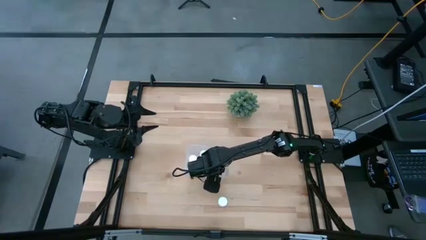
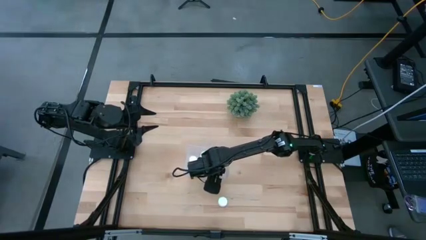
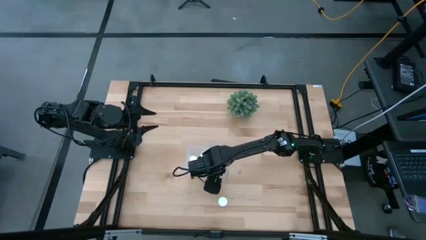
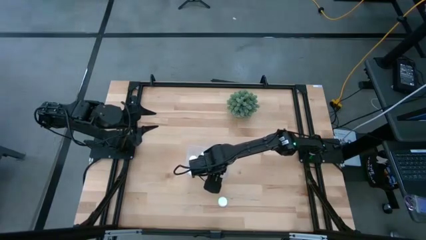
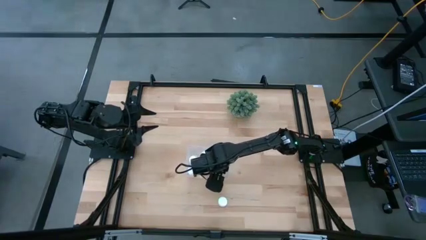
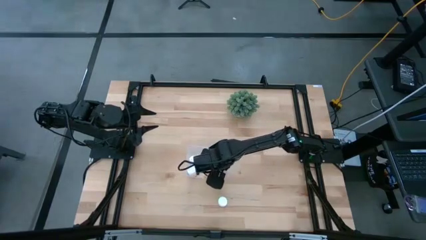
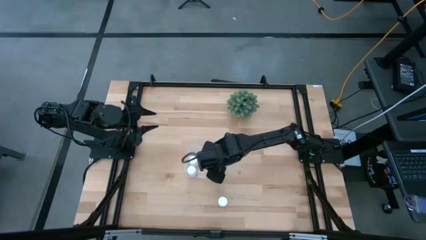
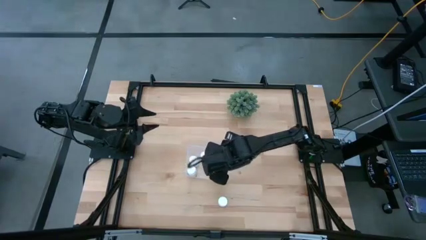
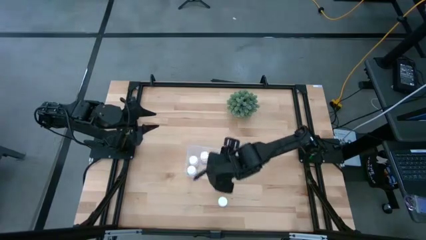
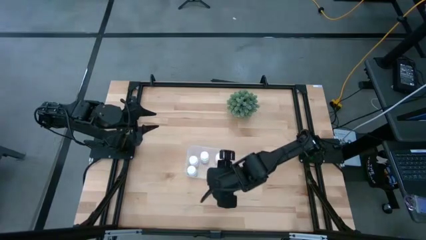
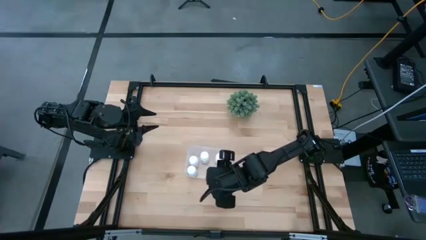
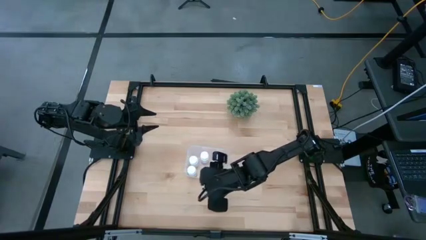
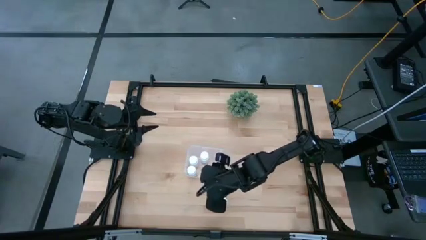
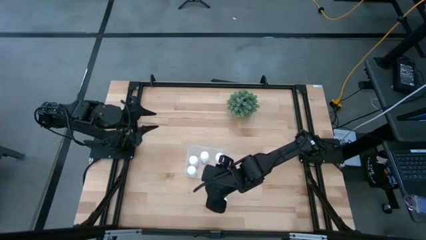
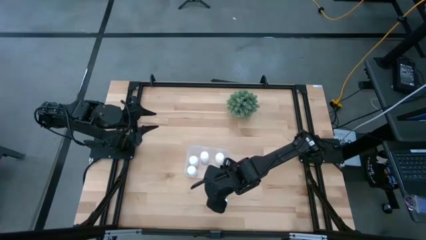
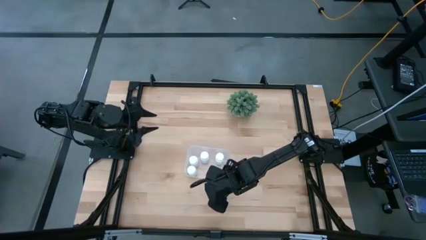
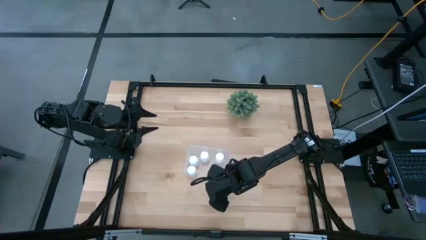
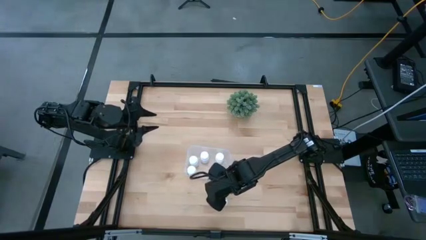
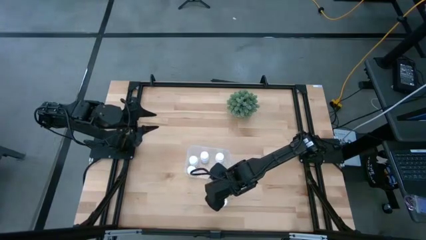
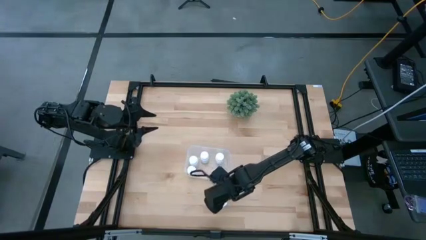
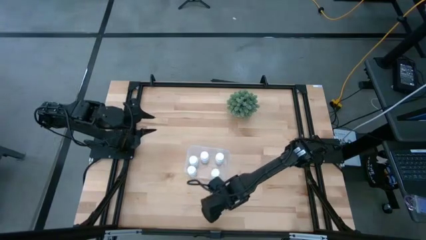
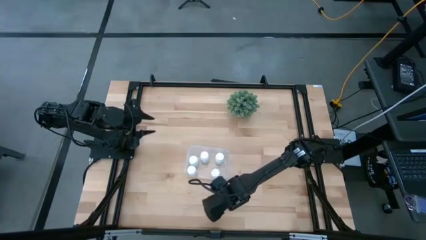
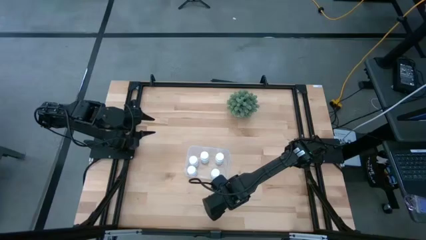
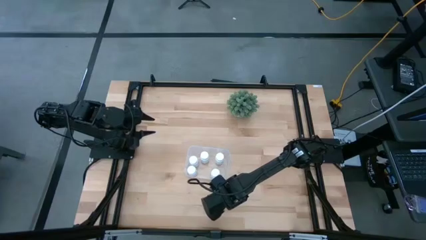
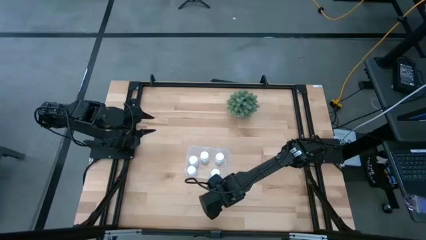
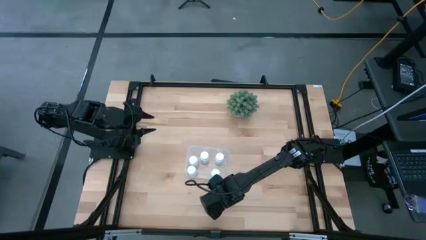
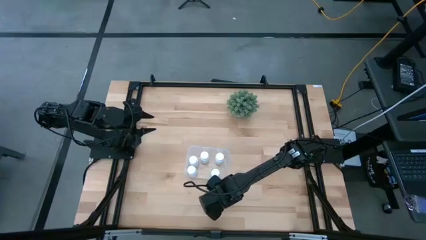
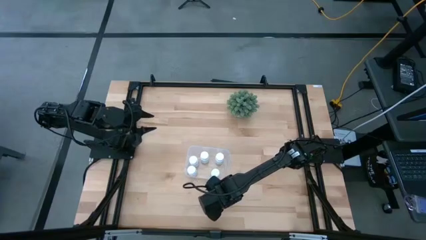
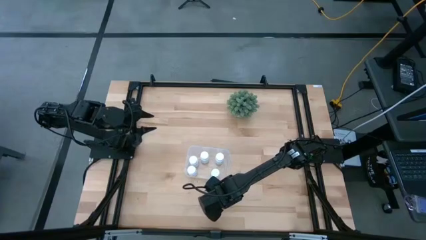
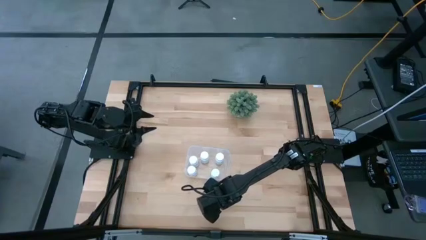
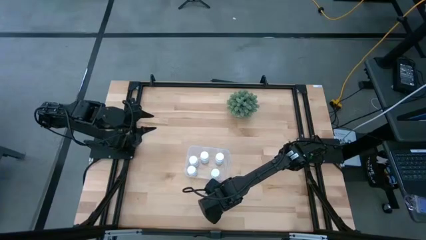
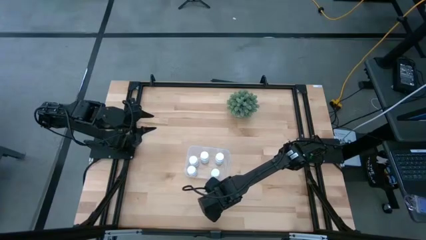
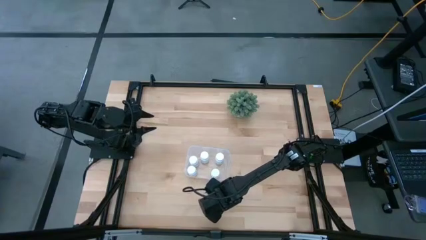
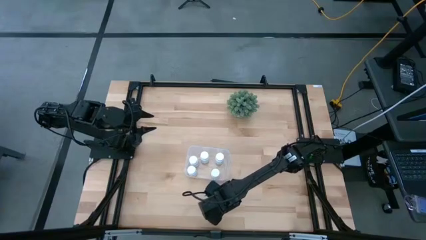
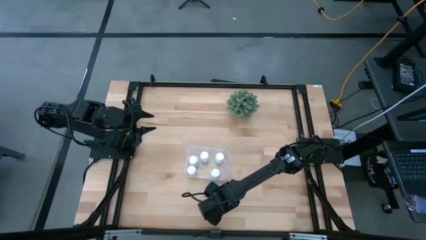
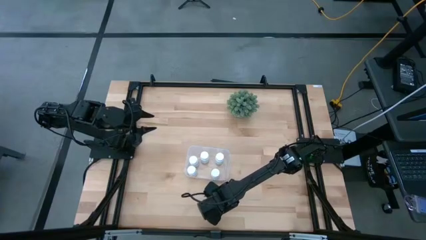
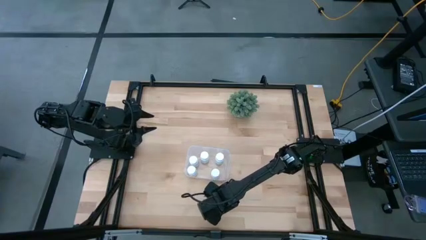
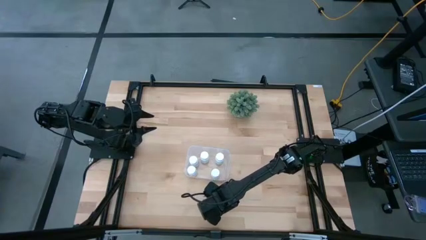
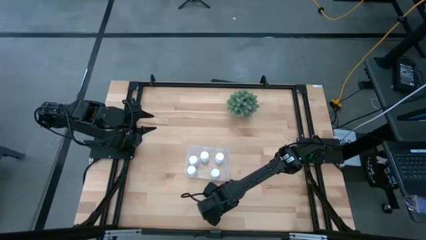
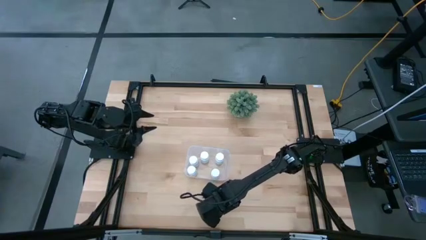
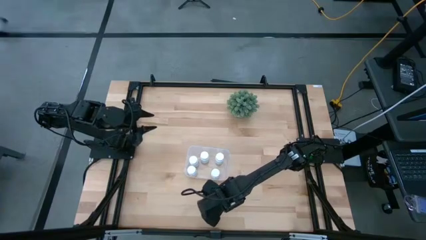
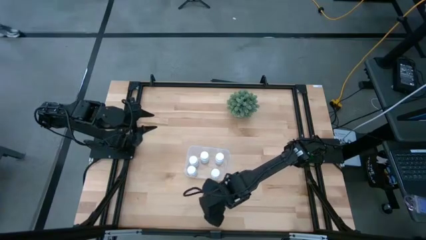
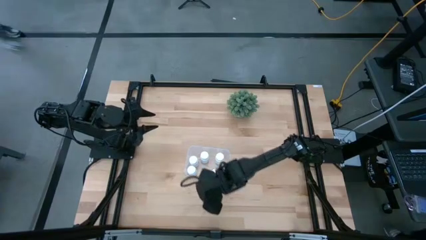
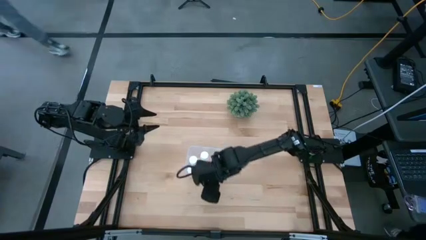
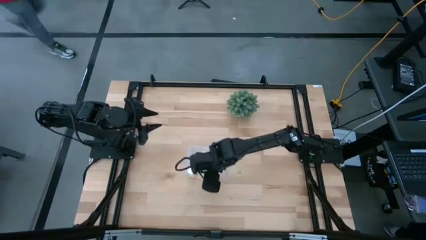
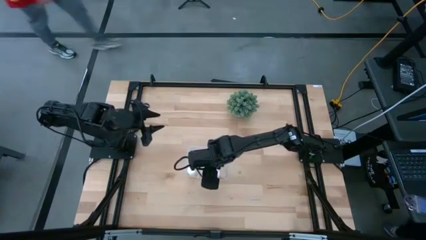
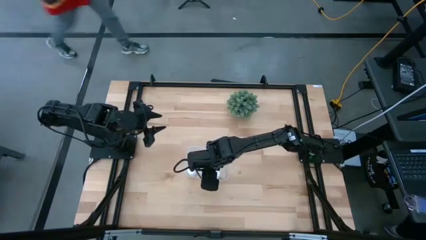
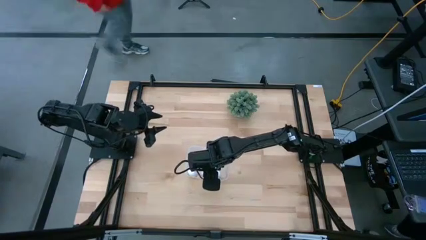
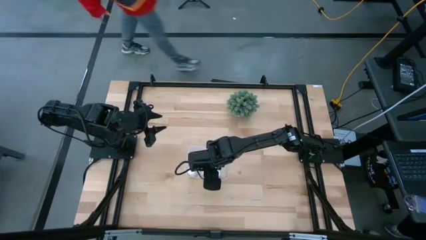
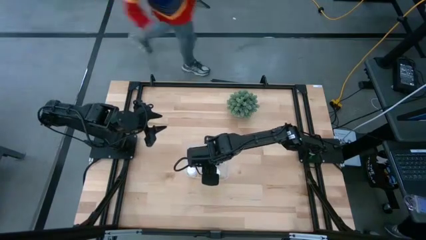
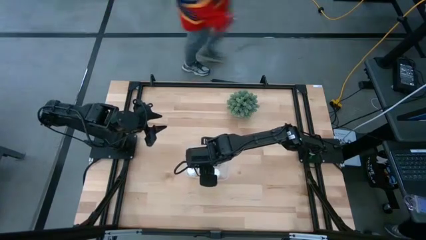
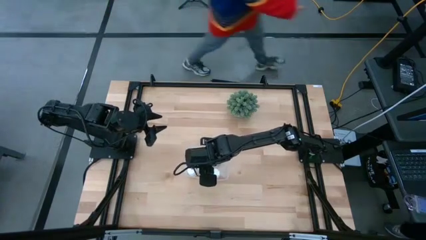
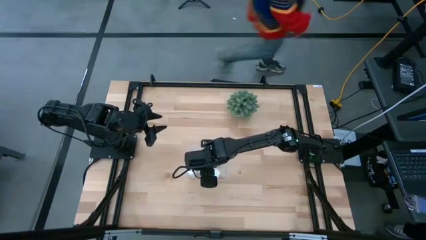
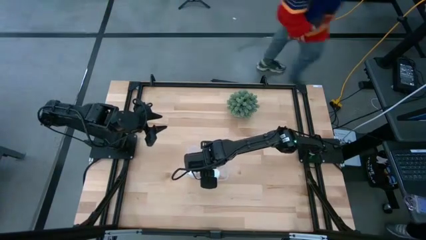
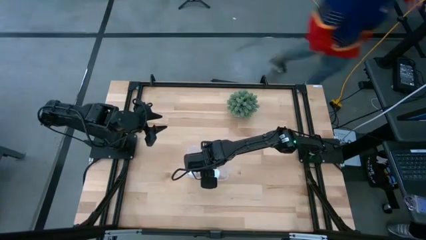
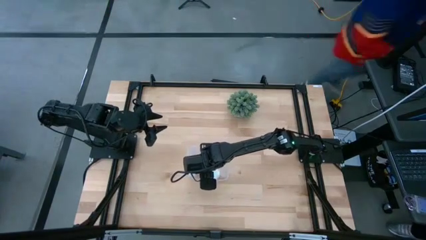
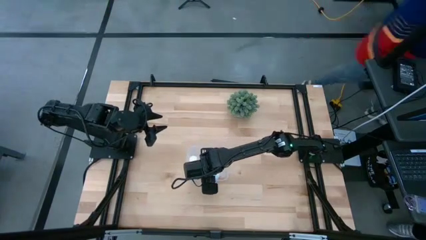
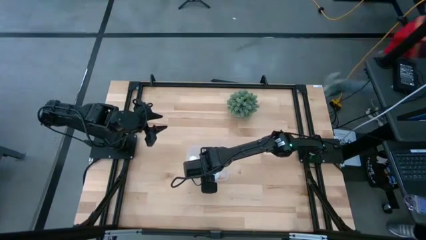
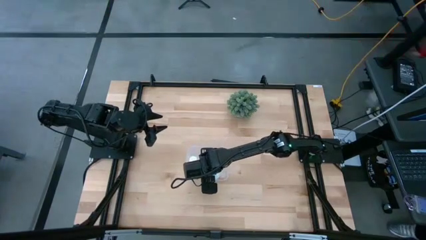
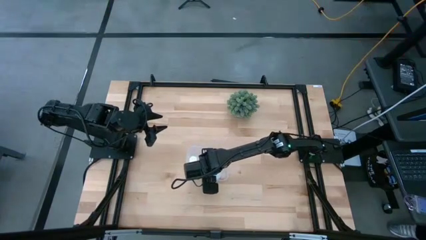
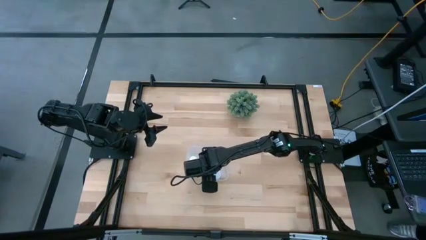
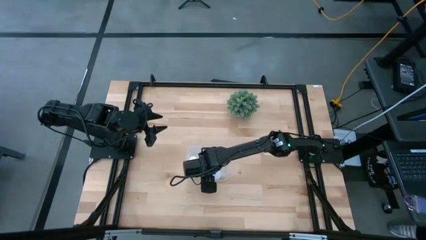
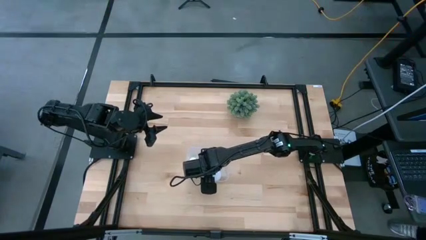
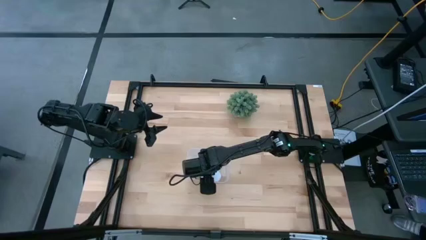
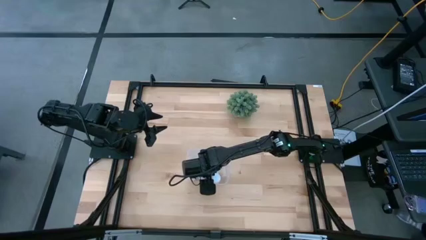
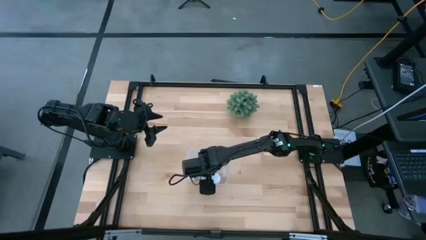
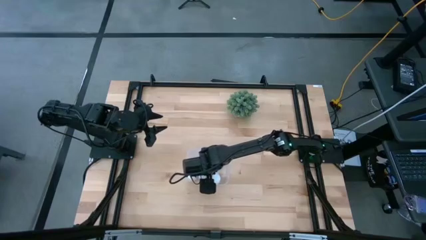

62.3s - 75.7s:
Task: Pick and place pill bottles into a basket
Put the white medicine bottle into the transparent bin

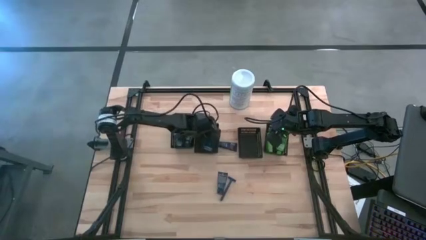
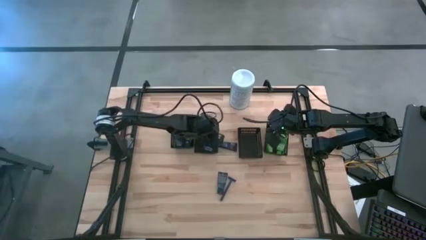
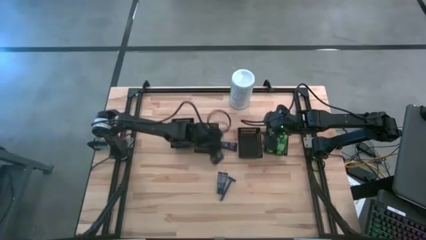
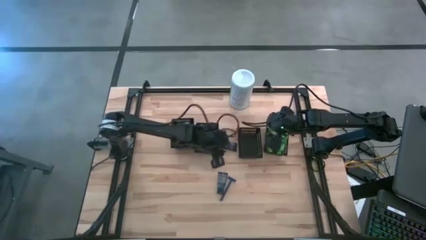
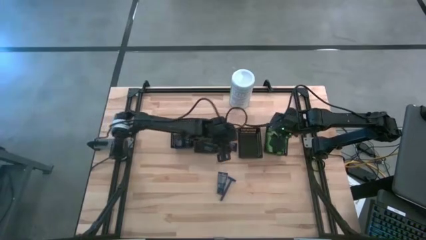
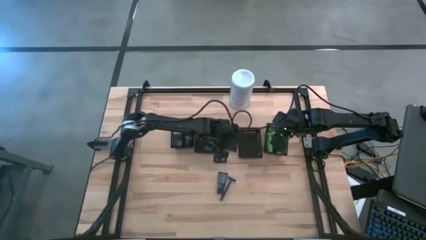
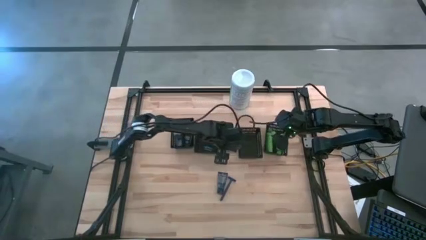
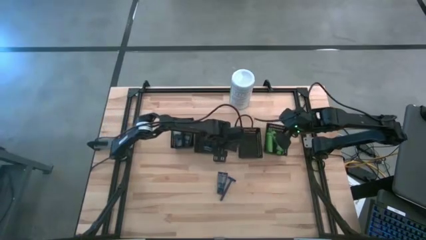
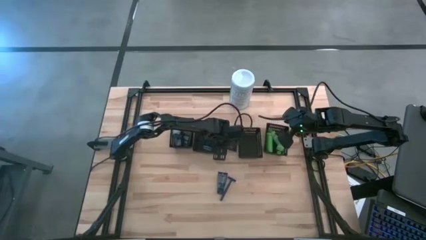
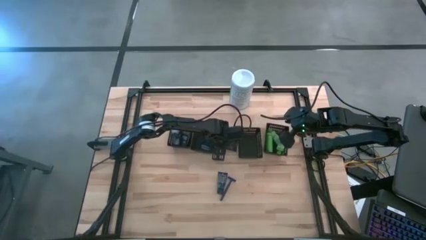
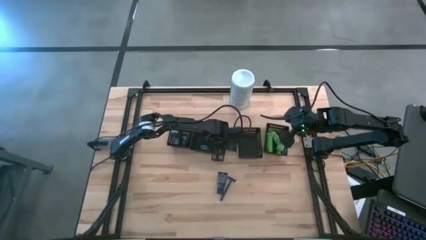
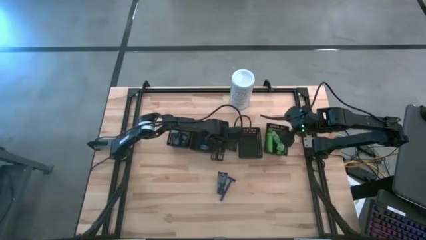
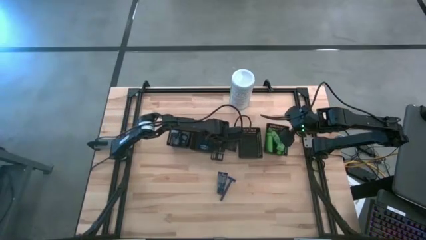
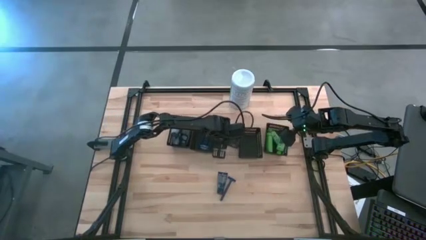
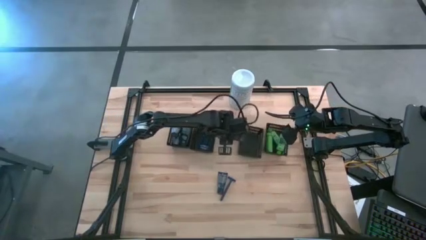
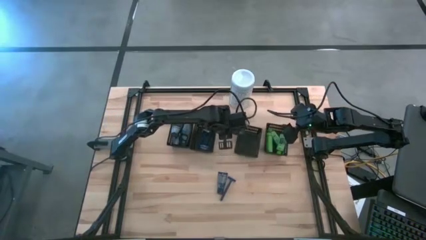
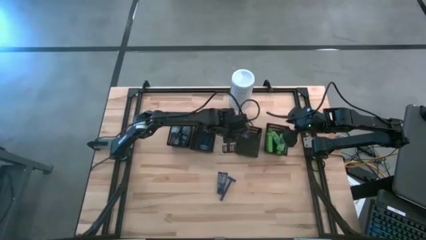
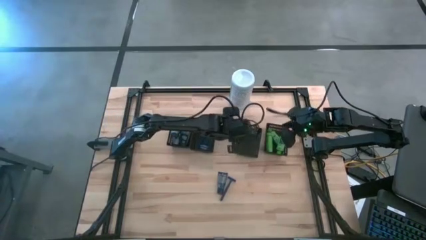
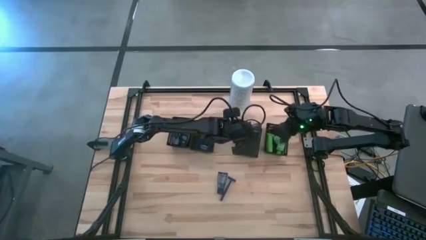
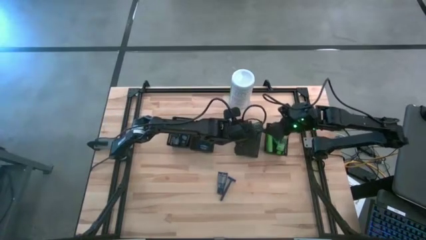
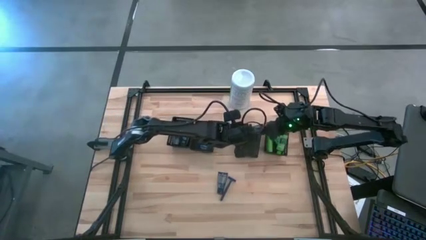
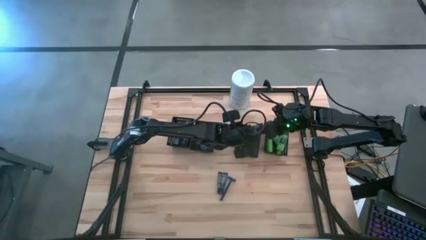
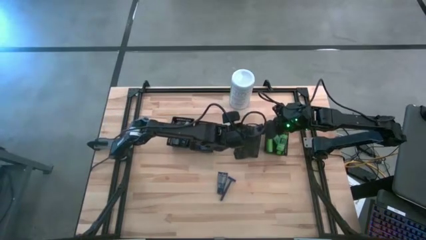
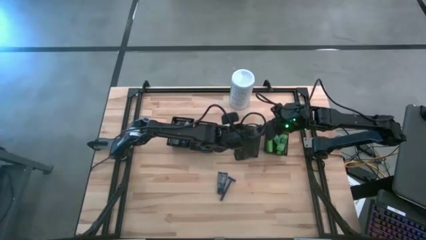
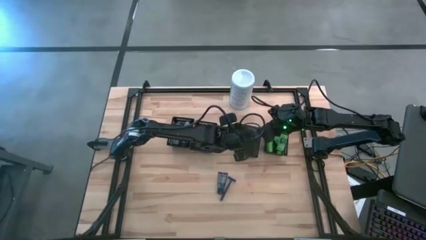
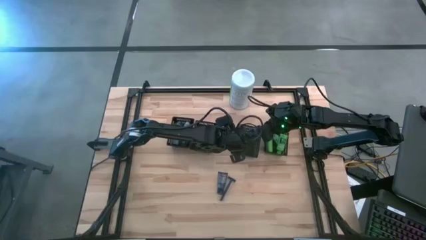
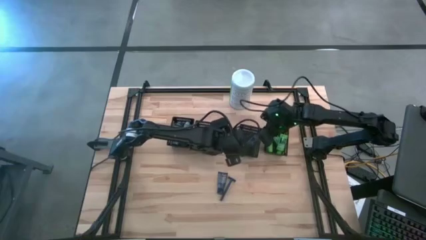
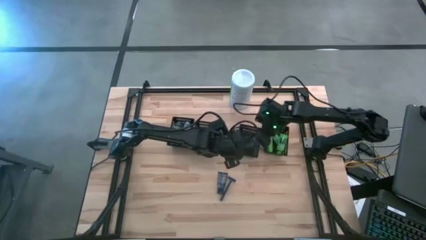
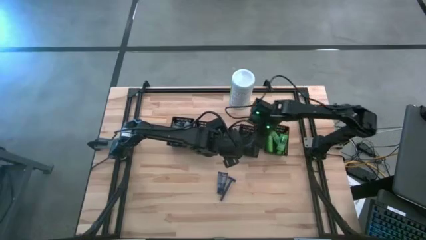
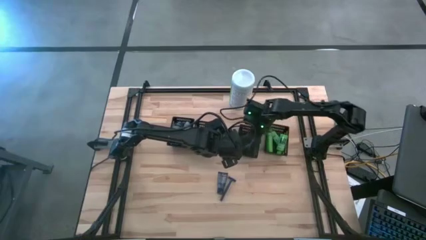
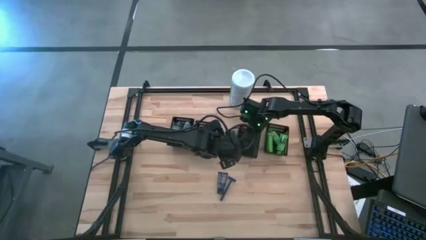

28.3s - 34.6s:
Task: Pick & Place Travel size toiletries
Put the blue shaver cream into the middle right black bin
